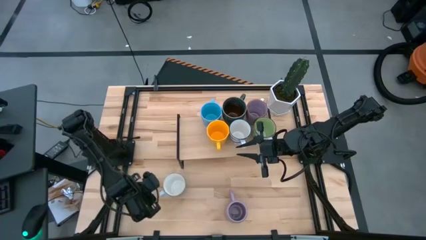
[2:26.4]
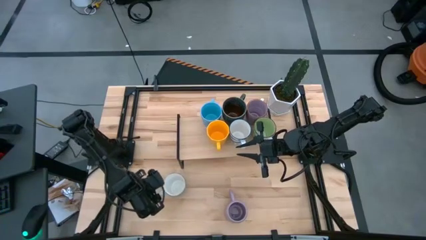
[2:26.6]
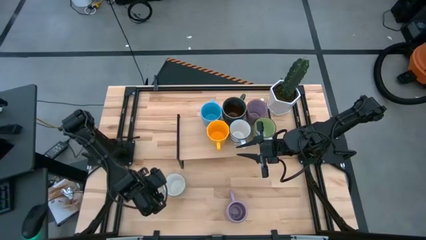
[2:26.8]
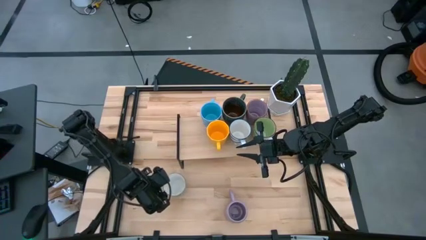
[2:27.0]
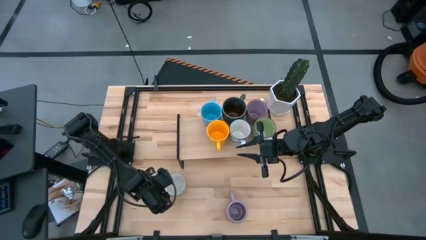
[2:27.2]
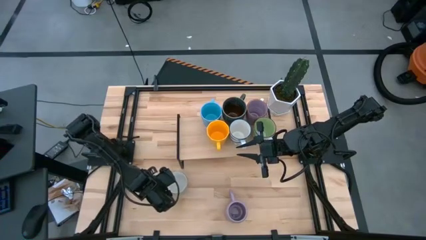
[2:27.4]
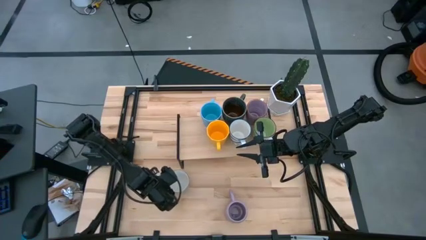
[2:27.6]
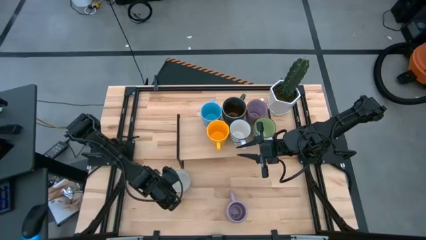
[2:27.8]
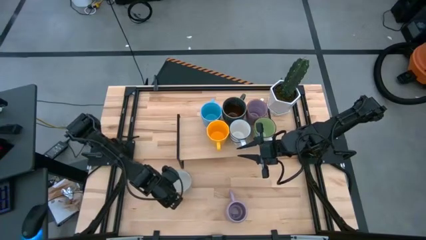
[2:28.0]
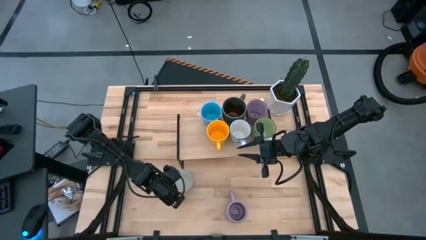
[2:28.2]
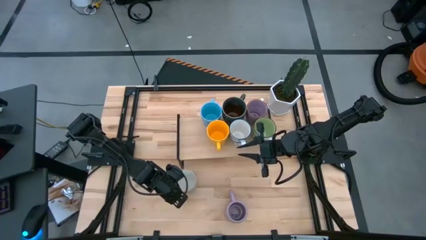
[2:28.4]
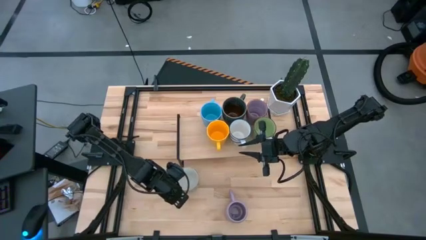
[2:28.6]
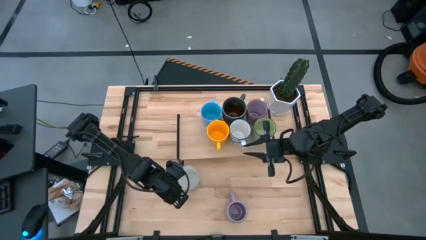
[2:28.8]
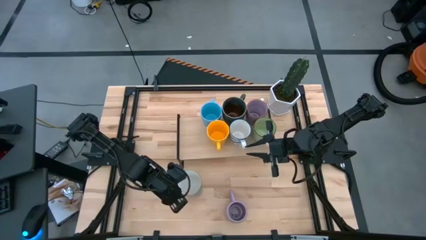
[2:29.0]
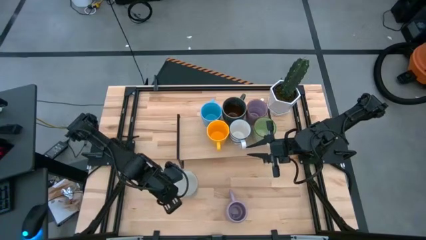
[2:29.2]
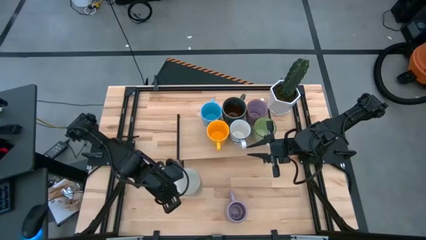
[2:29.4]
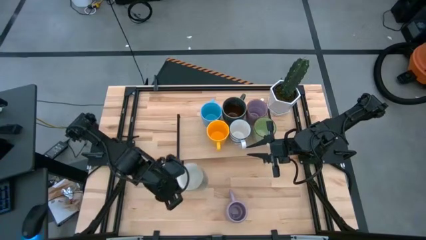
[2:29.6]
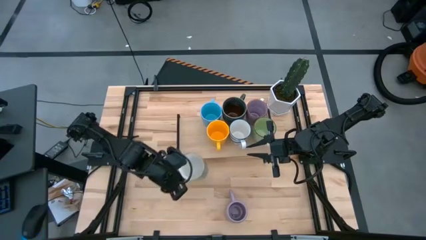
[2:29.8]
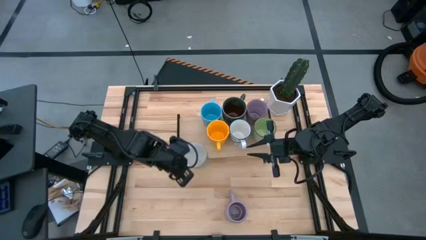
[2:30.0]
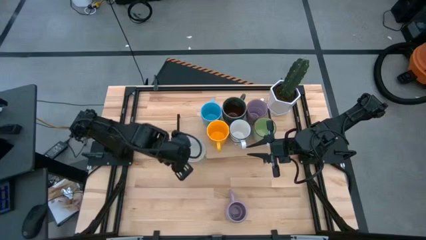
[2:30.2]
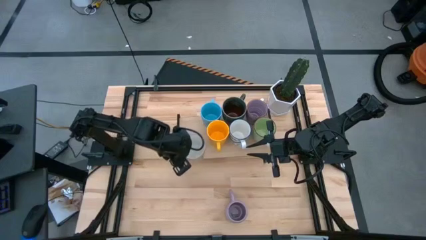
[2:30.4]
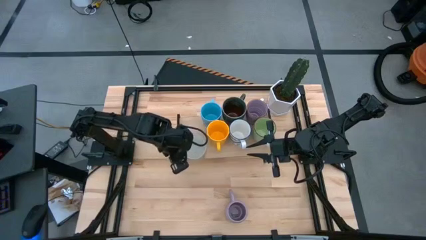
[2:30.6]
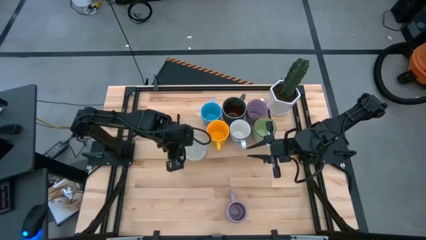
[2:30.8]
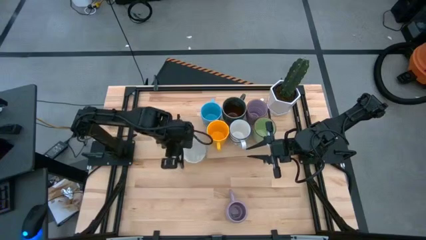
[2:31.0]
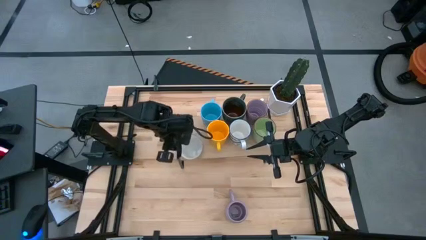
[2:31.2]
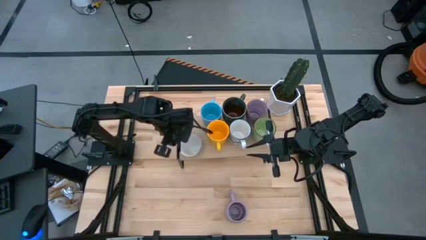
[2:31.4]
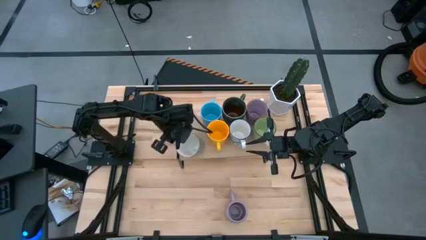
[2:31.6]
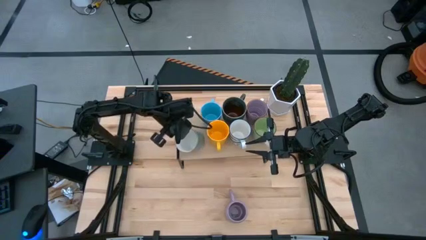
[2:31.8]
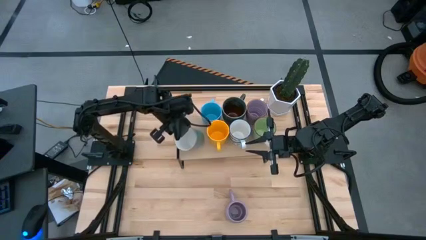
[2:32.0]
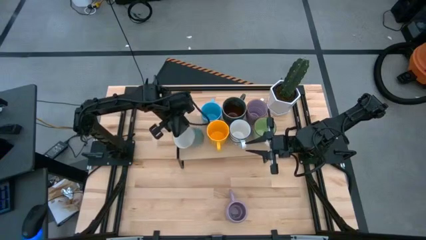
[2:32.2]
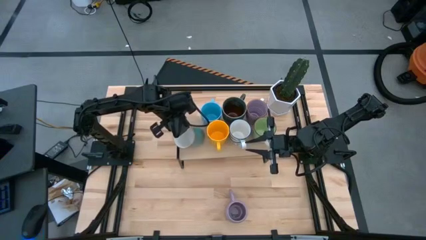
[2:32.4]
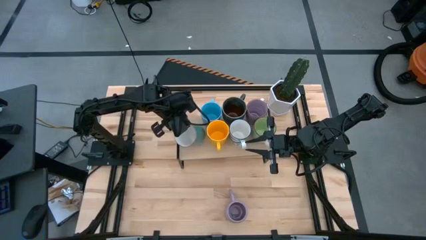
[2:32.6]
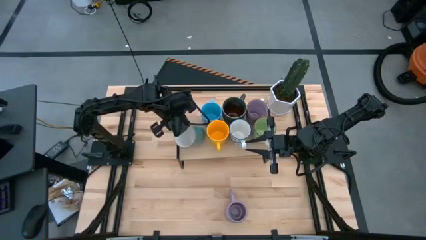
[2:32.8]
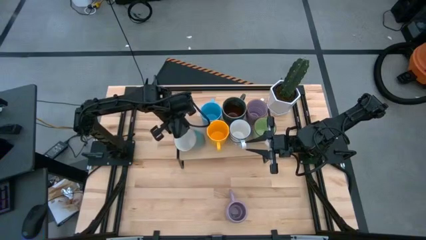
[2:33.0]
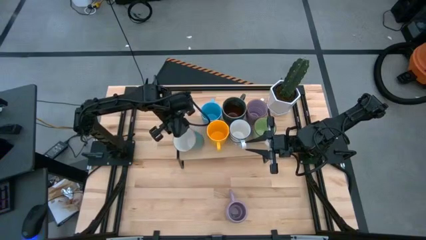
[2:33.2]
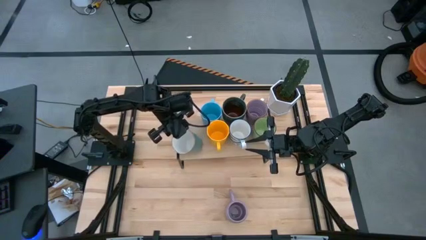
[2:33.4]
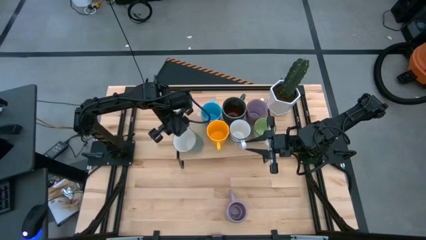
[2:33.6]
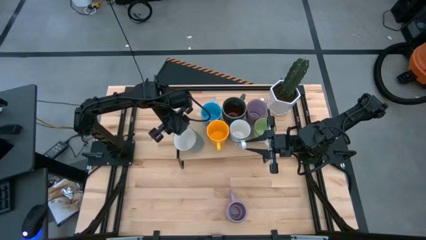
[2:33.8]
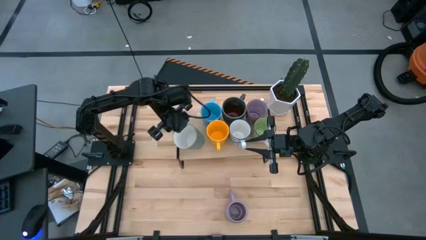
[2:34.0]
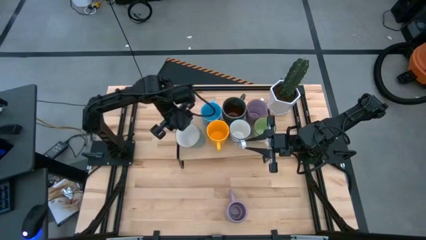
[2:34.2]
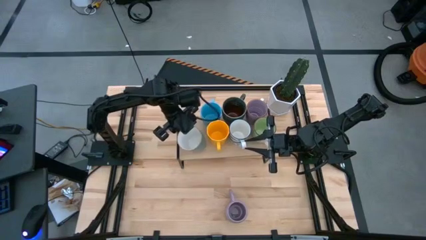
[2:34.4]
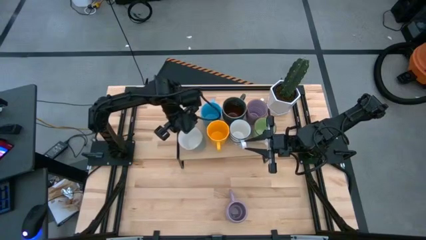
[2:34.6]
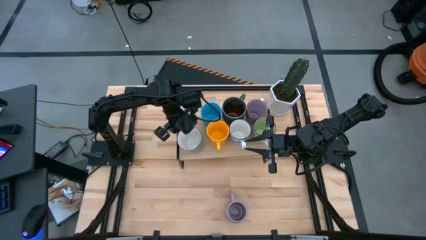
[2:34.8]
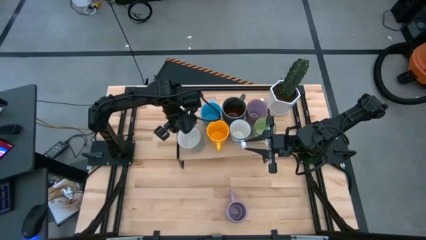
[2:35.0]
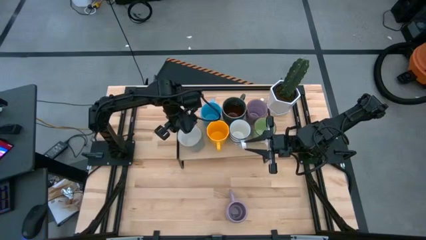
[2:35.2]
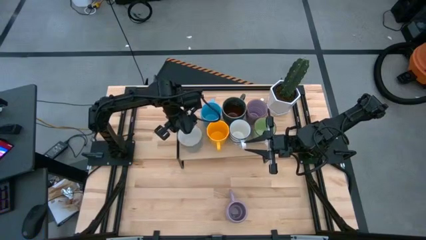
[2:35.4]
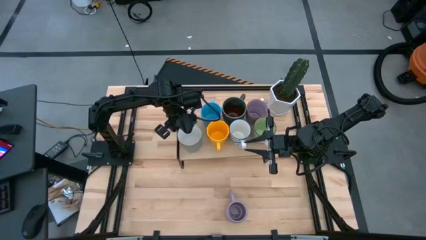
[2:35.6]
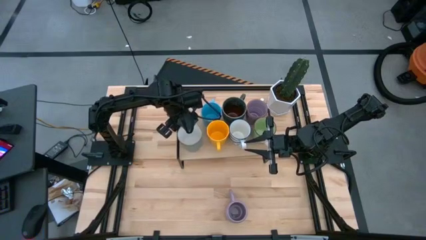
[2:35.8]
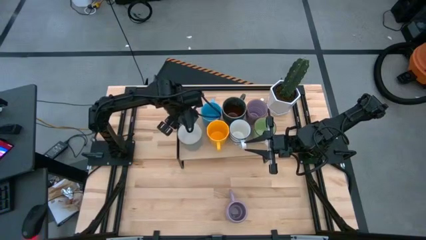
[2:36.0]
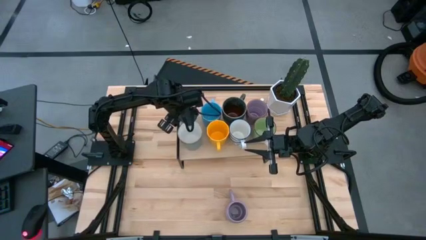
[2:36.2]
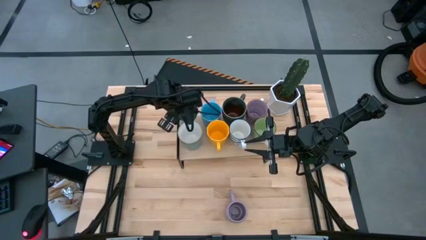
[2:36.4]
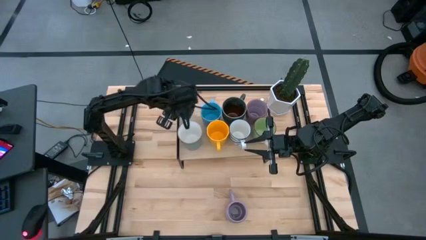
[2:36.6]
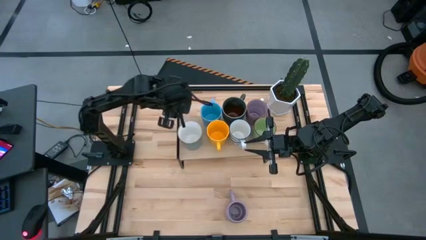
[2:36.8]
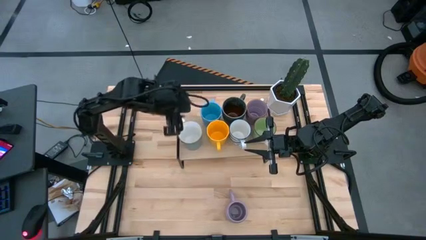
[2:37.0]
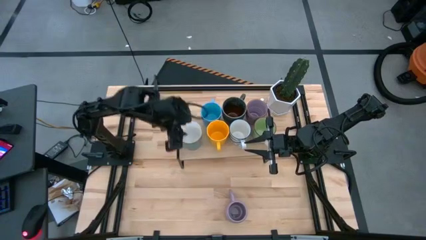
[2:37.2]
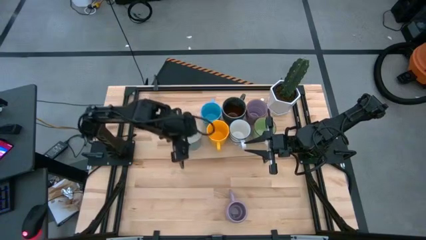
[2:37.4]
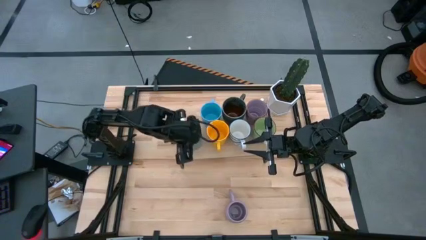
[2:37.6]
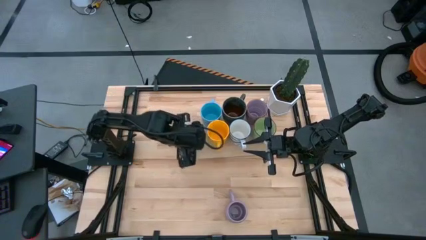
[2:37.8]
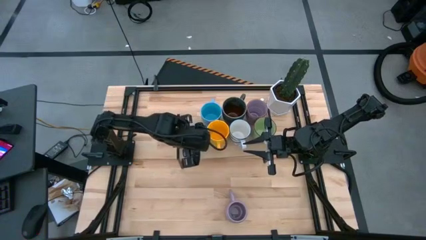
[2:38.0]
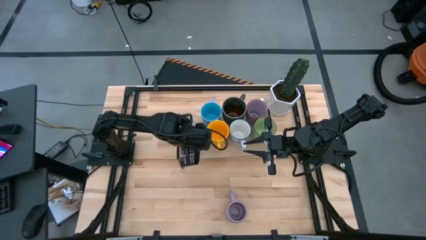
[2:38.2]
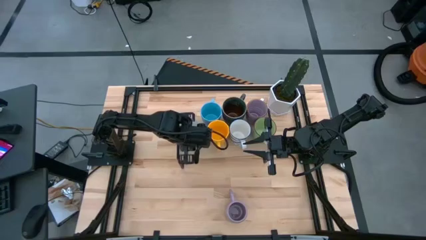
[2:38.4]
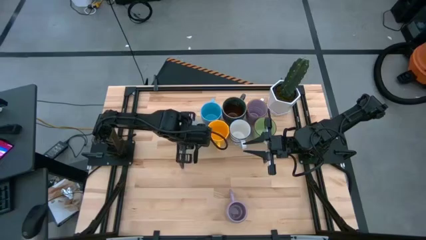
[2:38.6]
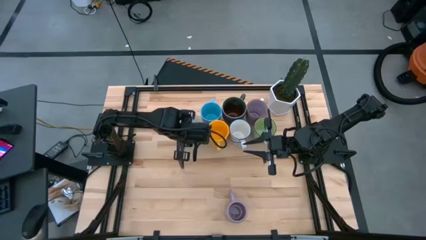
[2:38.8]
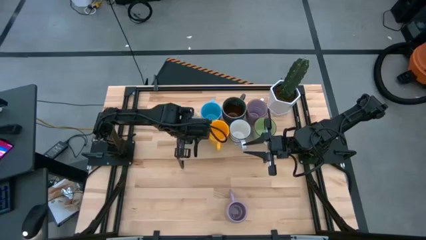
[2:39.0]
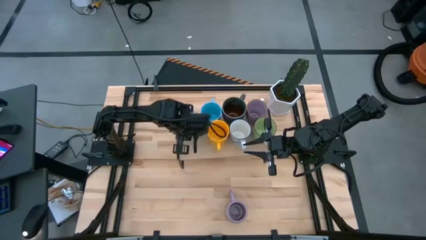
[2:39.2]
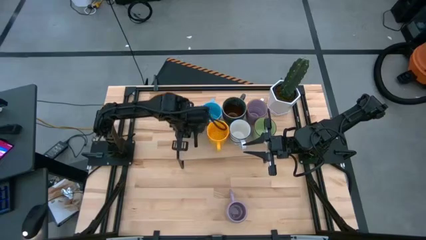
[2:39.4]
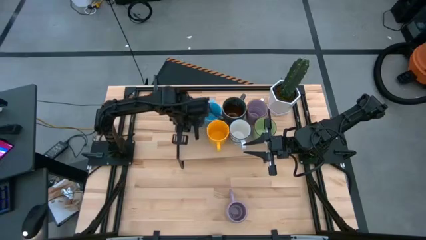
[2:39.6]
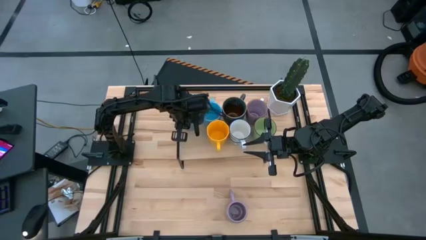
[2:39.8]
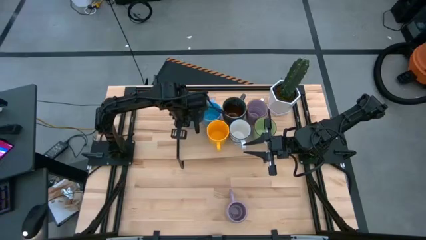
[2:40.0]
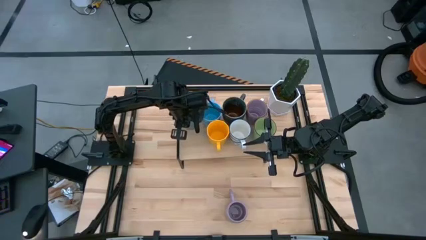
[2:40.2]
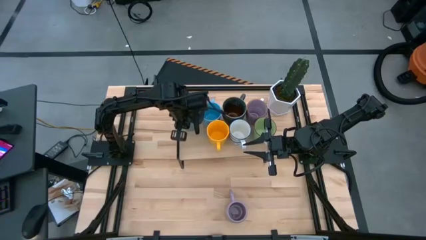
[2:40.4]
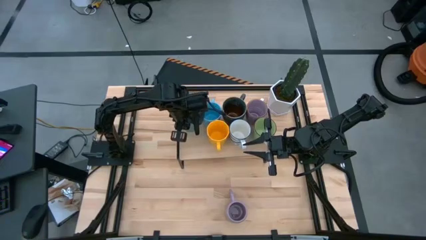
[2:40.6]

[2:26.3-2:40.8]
Task: Place coffee mugs
Put the light blue mug on the shelf
